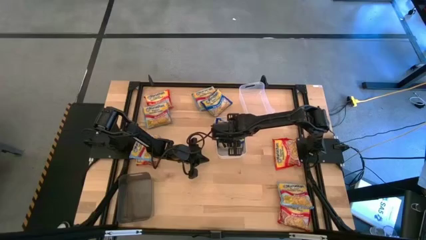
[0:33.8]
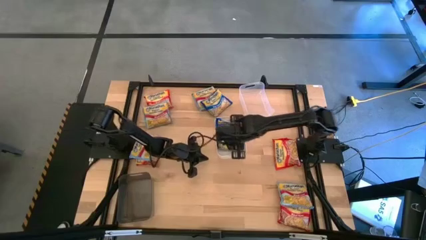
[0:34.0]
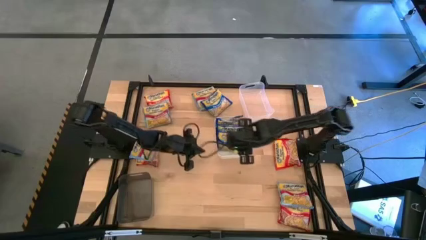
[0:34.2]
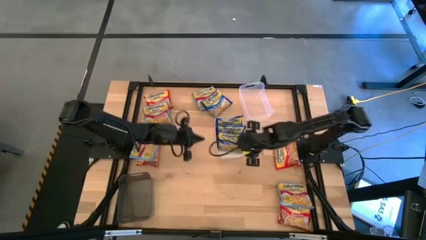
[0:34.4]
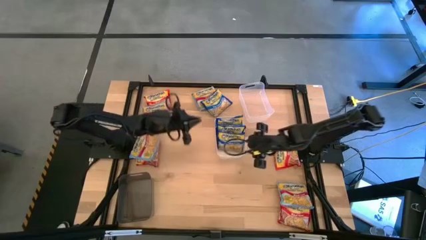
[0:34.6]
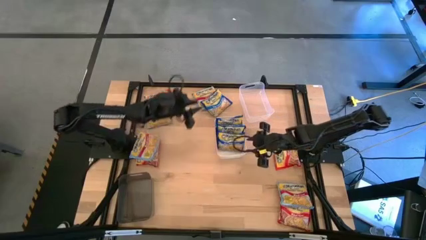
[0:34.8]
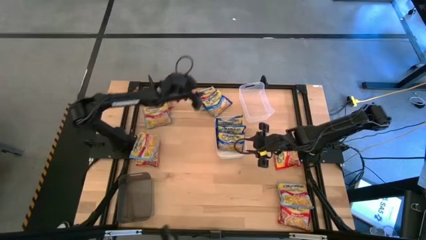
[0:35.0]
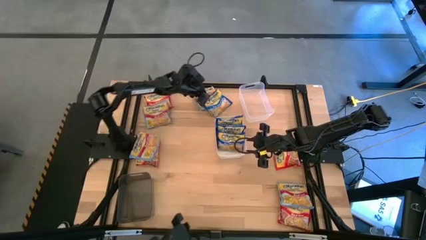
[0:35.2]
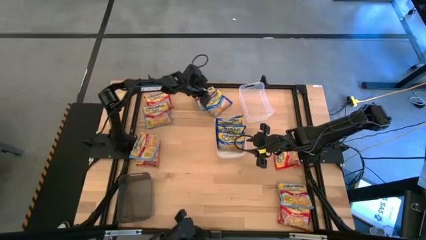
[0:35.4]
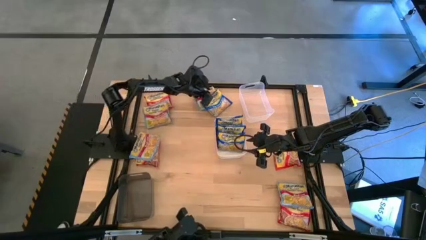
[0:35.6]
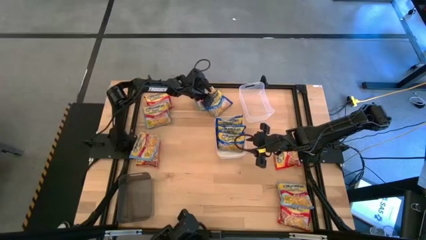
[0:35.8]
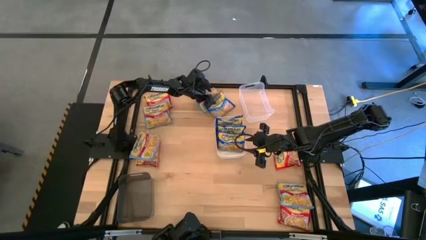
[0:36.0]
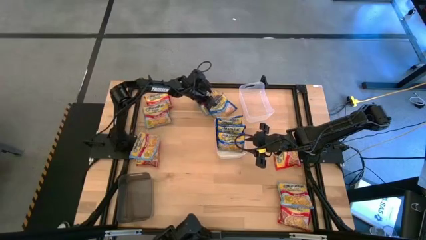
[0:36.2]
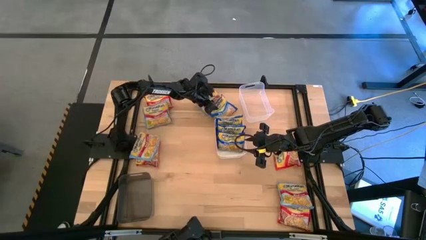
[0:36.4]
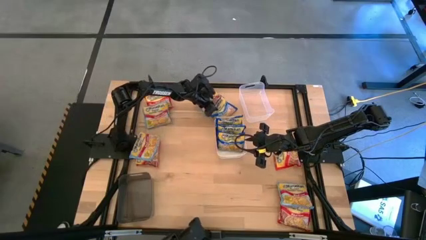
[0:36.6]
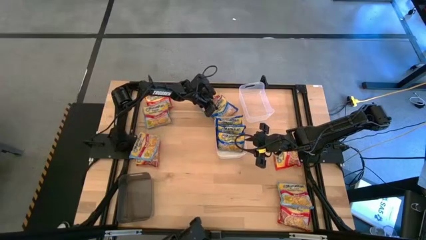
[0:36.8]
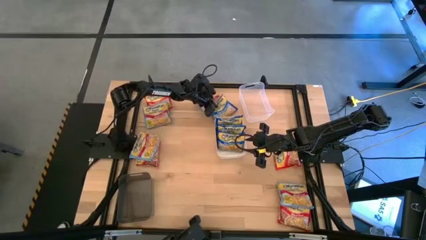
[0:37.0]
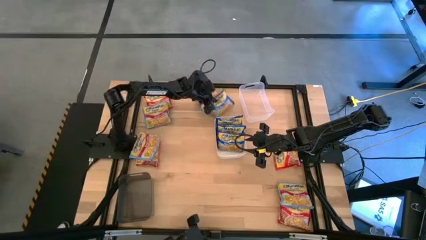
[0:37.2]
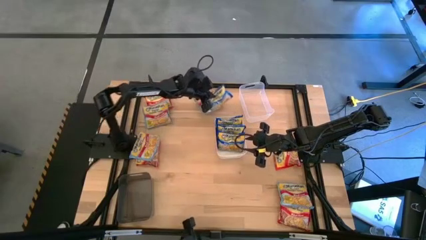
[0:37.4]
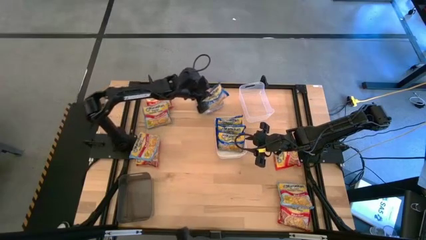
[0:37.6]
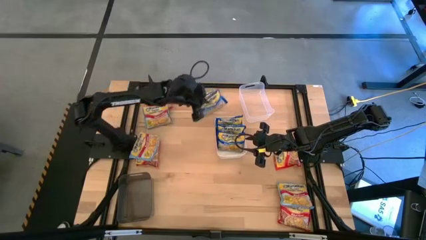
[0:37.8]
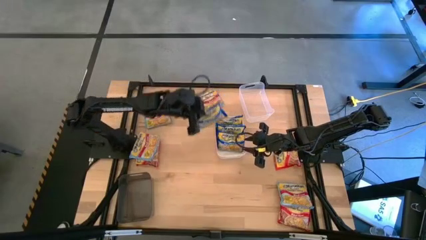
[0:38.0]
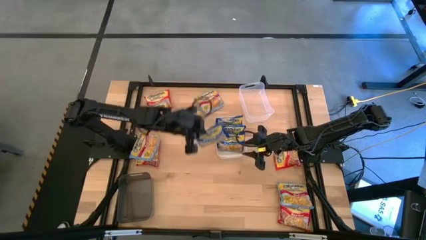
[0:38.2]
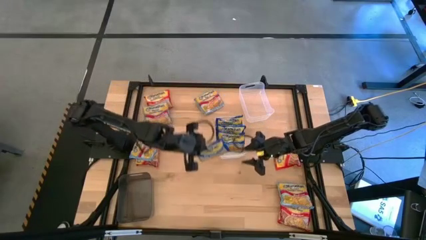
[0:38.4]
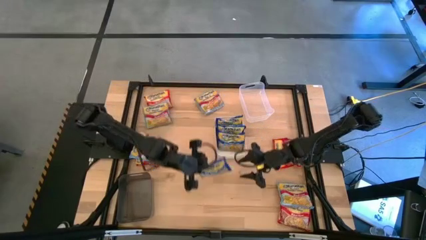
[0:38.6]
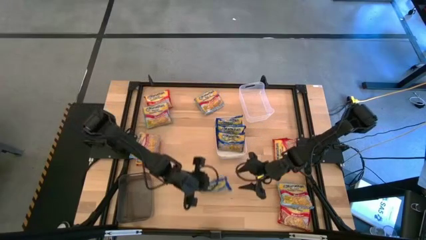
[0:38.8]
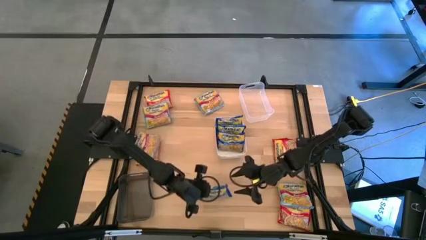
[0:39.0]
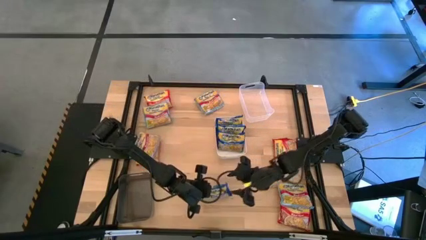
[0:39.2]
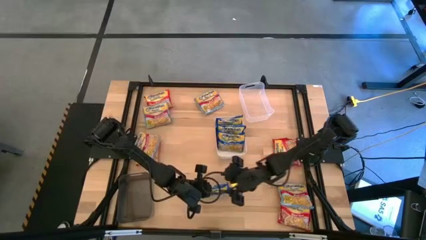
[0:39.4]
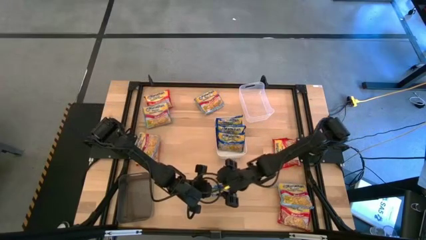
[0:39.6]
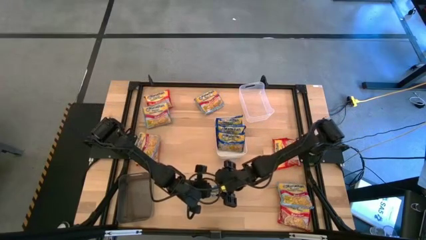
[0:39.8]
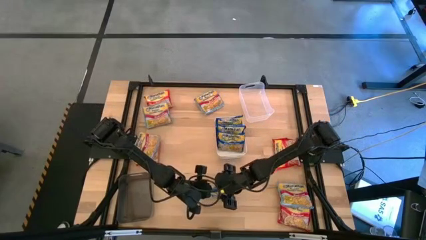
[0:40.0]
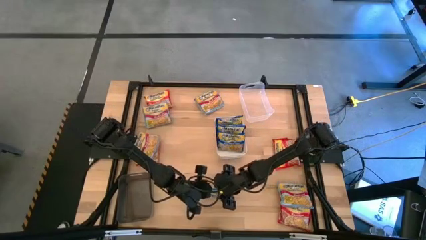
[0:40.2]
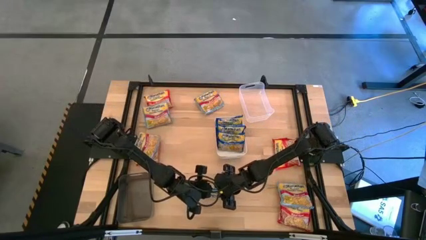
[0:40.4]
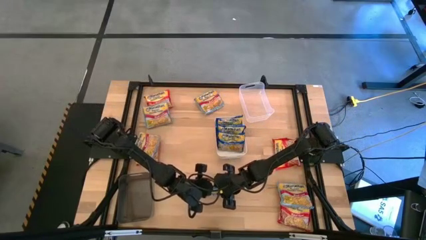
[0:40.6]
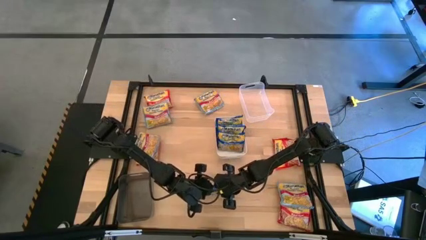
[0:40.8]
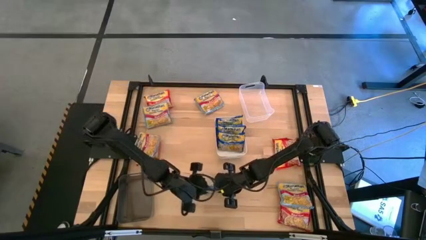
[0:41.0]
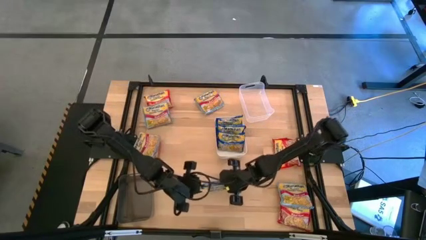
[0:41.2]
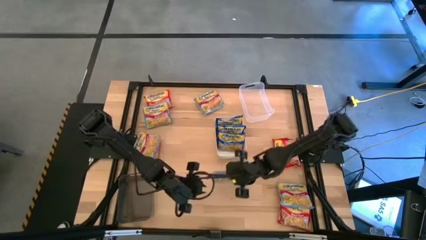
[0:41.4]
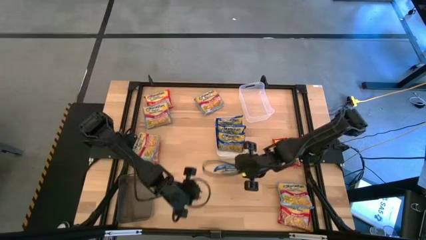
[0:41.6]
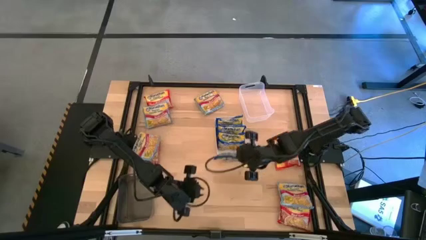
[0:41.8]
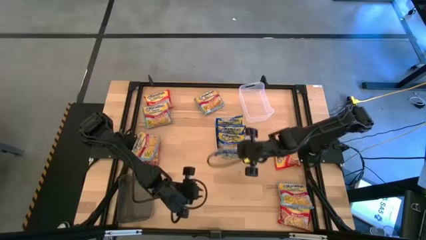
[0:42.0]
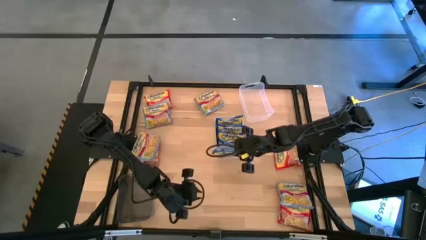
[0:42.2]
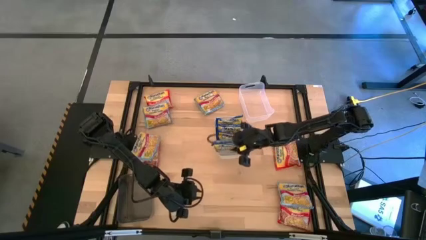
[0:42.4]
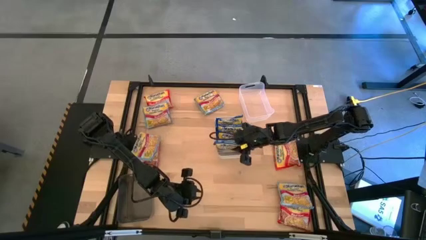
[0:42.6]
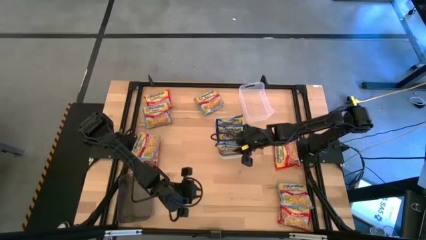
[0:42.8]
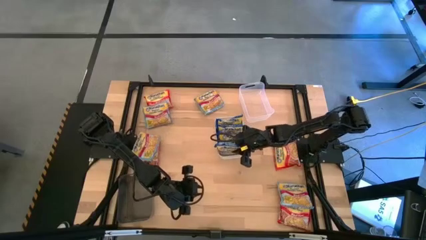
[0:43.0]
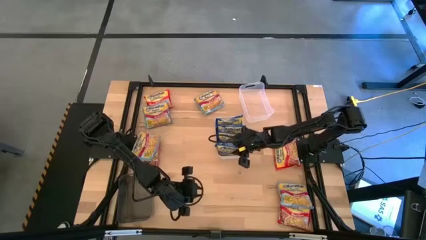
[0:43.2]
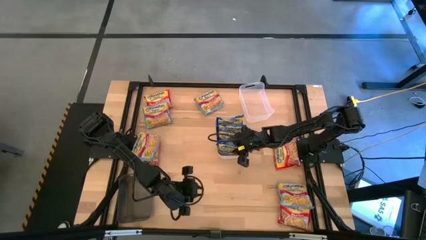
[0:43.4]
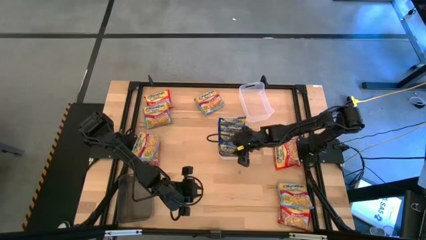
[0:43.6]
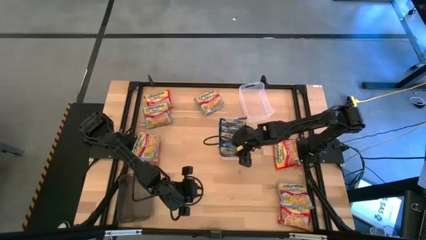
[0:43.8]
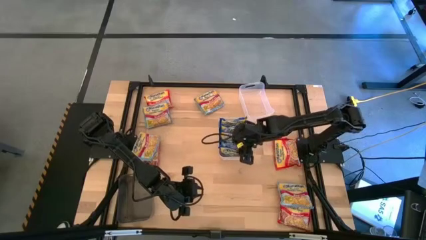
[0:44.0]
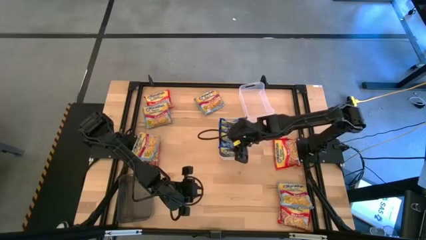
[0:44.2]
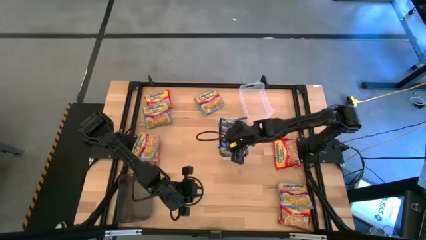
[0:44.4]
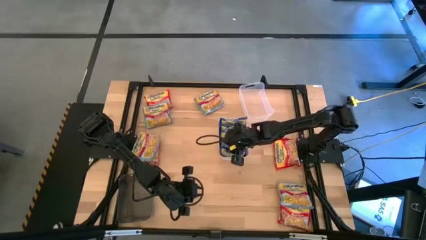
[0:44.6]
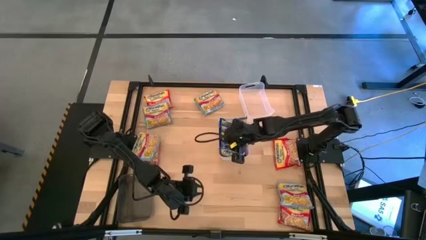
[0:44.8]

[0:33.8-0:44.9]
Task: Sort Maruchan noodles
Put the blue noodle pack in the white bin
